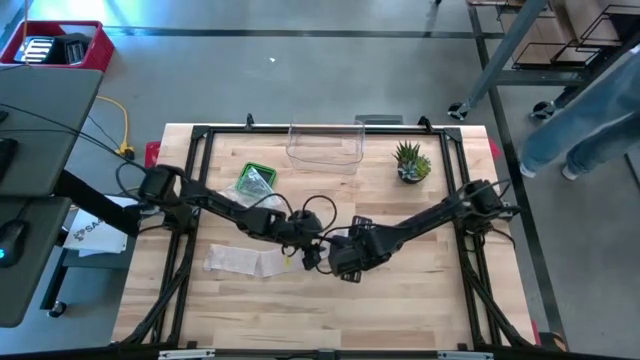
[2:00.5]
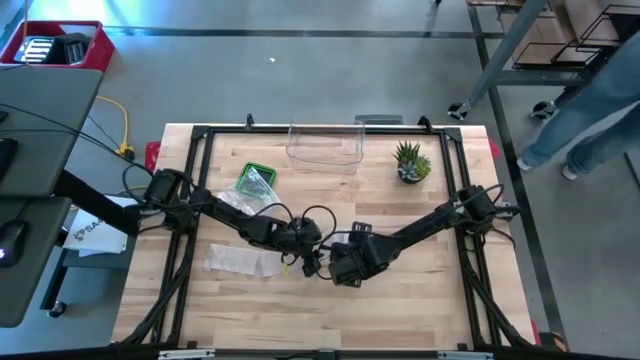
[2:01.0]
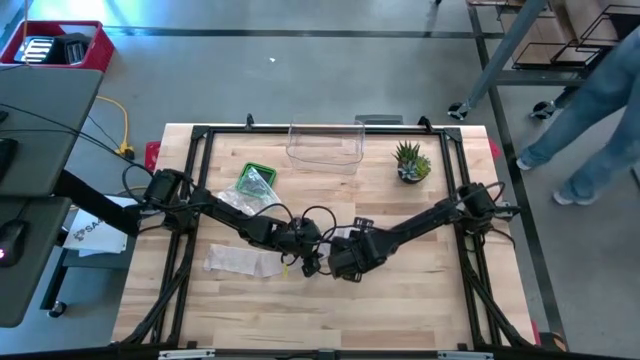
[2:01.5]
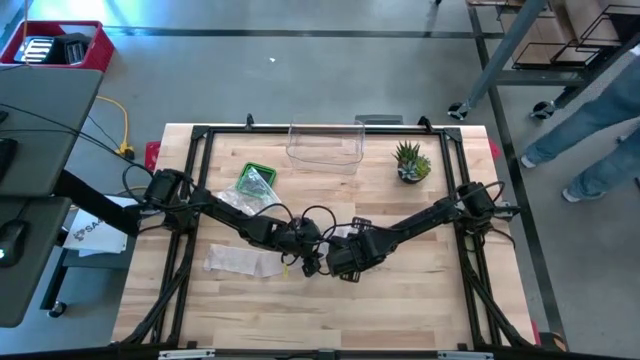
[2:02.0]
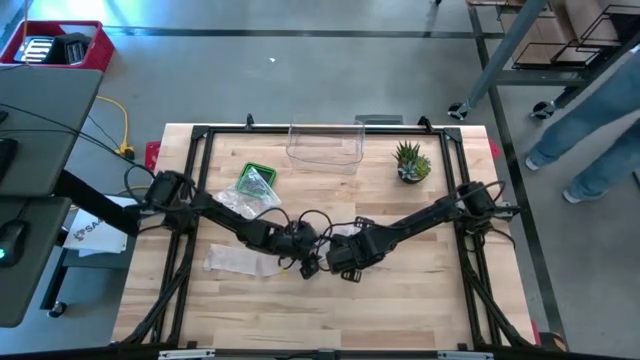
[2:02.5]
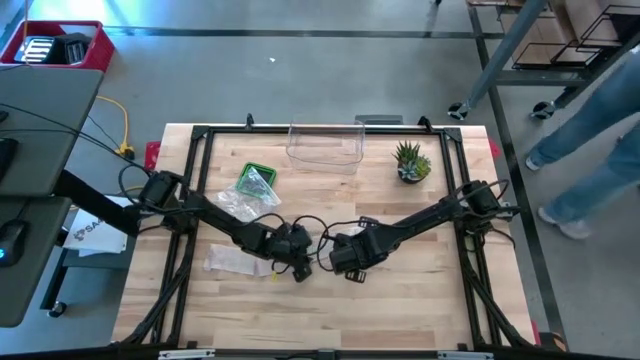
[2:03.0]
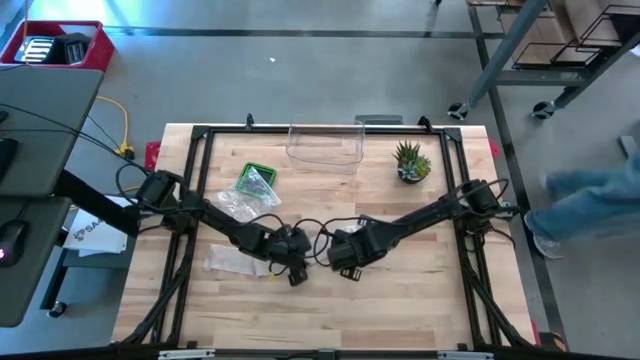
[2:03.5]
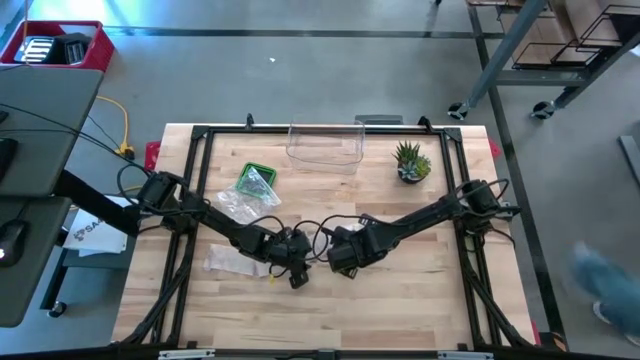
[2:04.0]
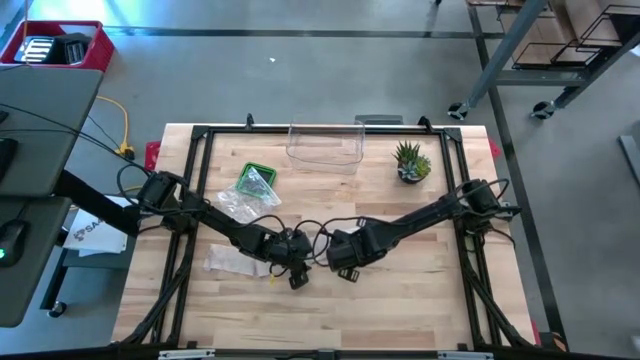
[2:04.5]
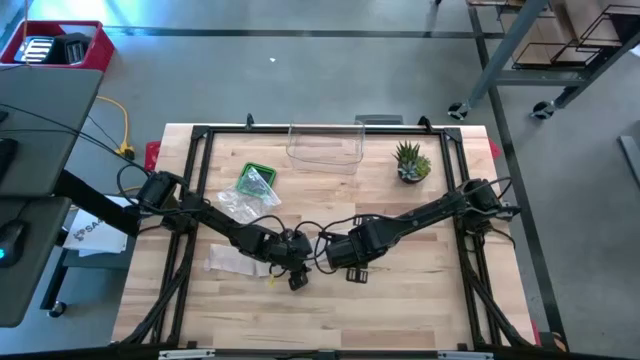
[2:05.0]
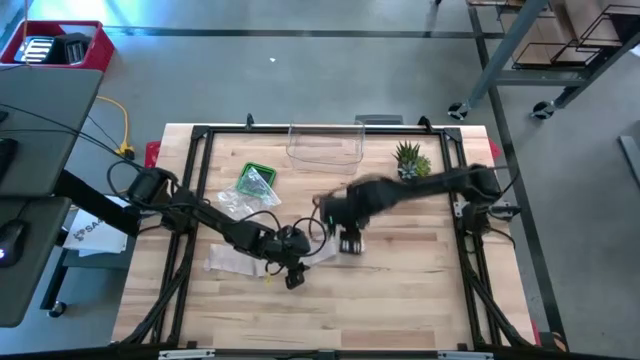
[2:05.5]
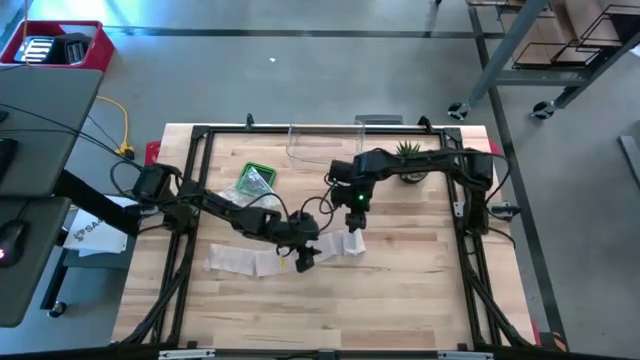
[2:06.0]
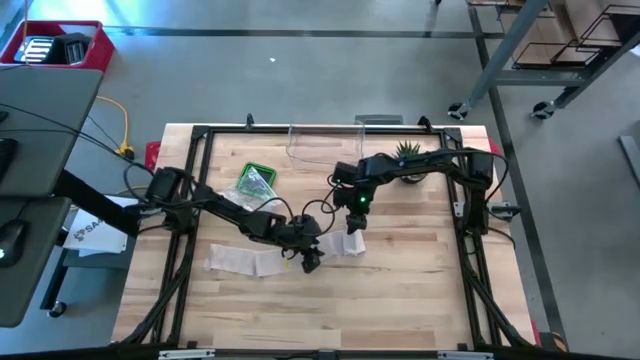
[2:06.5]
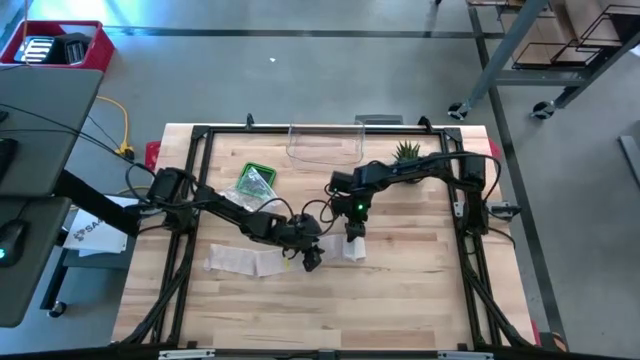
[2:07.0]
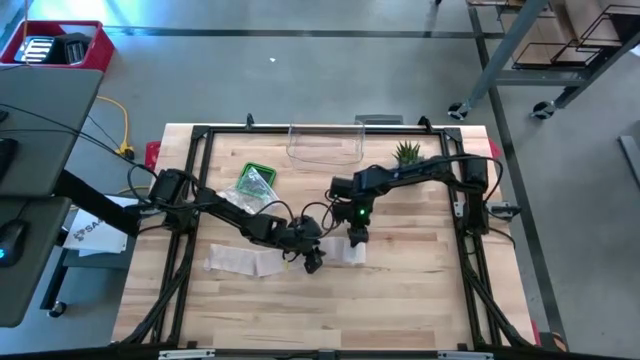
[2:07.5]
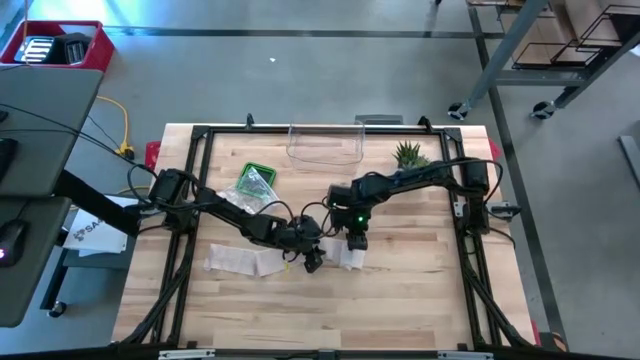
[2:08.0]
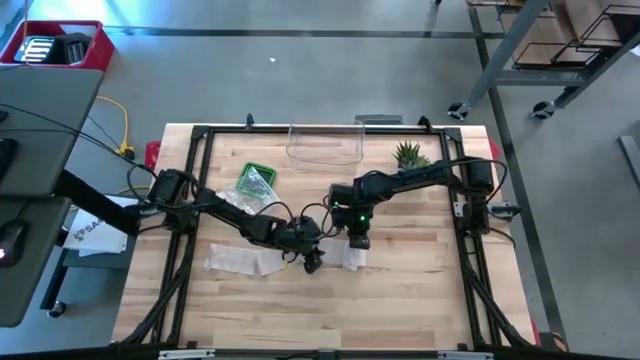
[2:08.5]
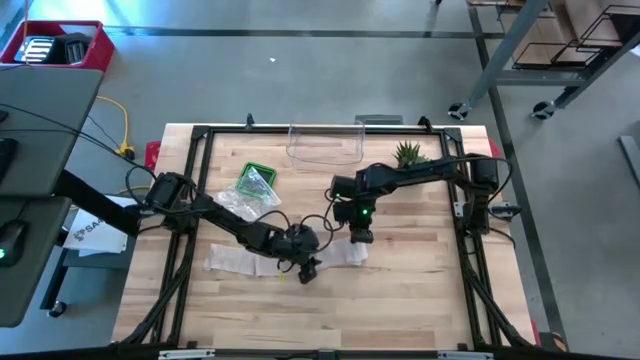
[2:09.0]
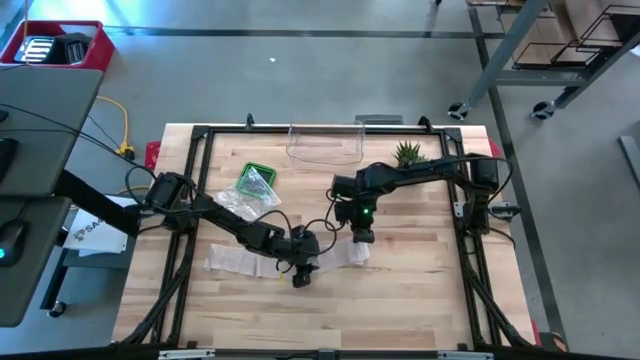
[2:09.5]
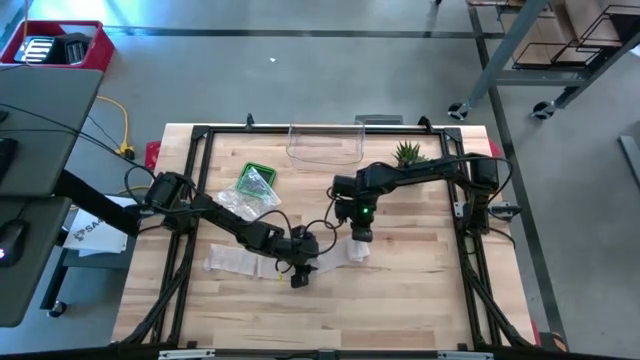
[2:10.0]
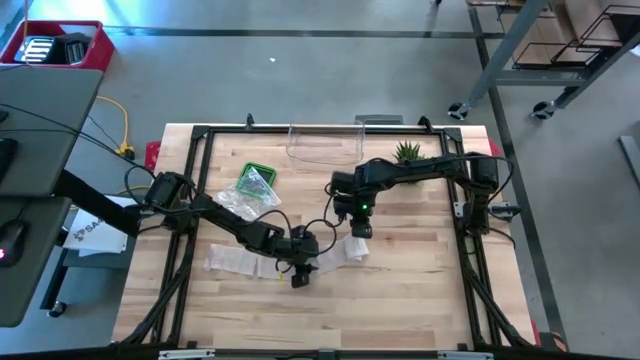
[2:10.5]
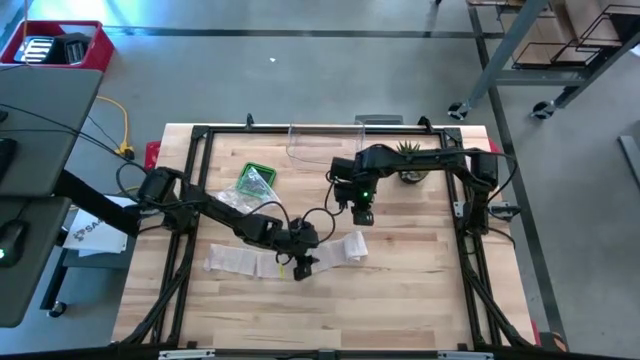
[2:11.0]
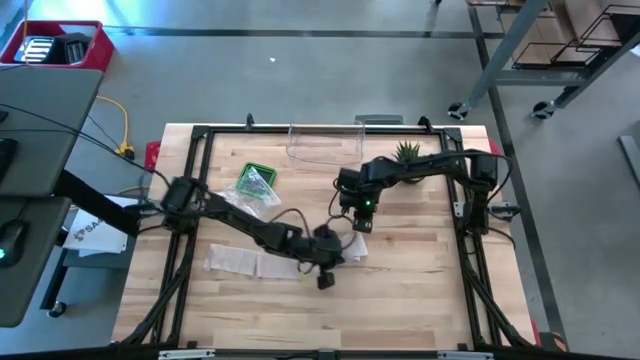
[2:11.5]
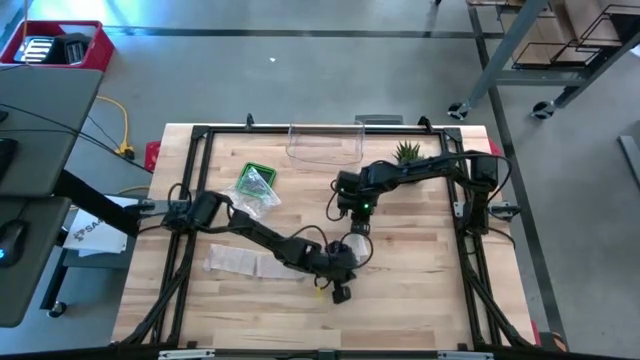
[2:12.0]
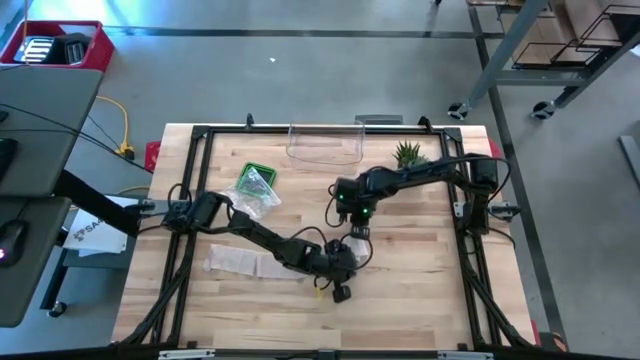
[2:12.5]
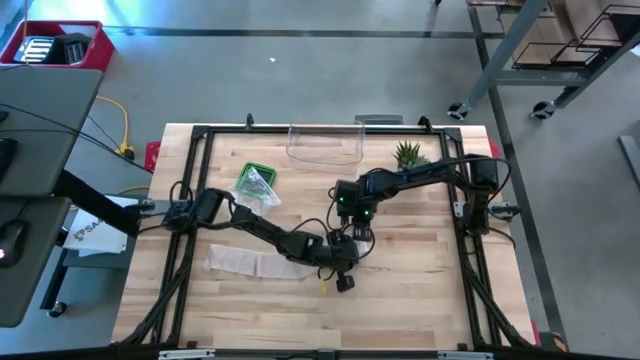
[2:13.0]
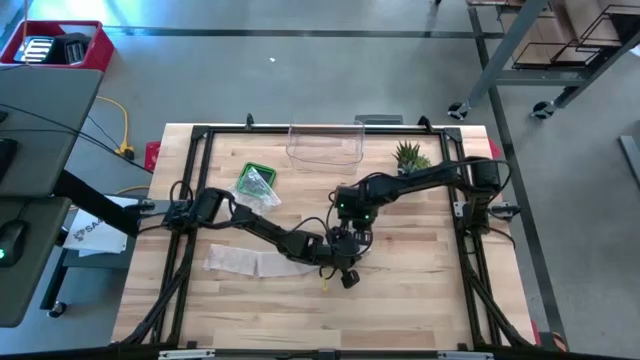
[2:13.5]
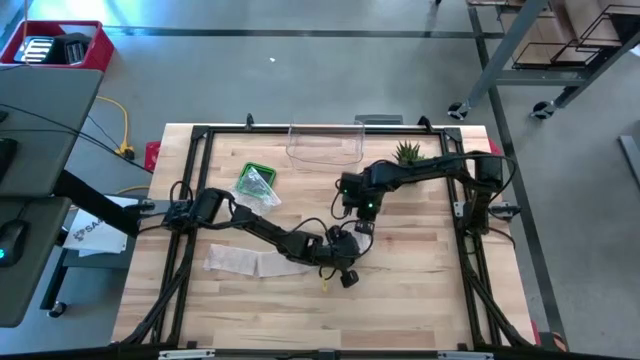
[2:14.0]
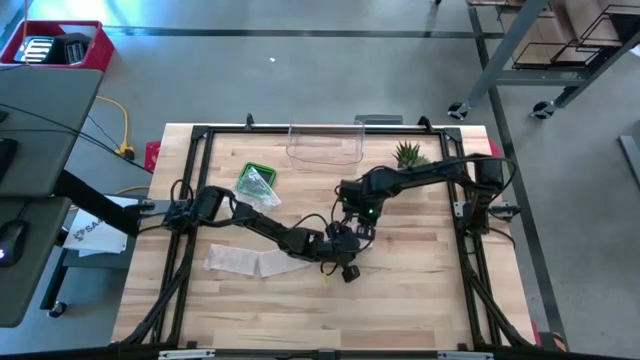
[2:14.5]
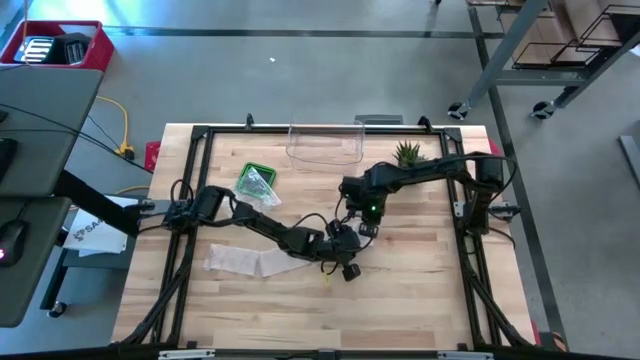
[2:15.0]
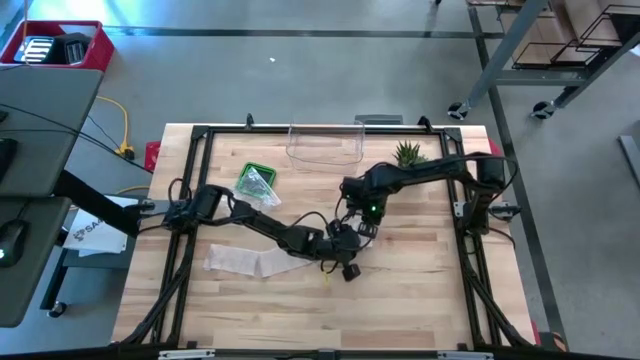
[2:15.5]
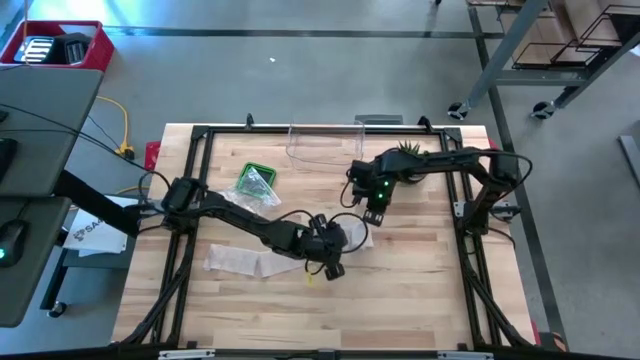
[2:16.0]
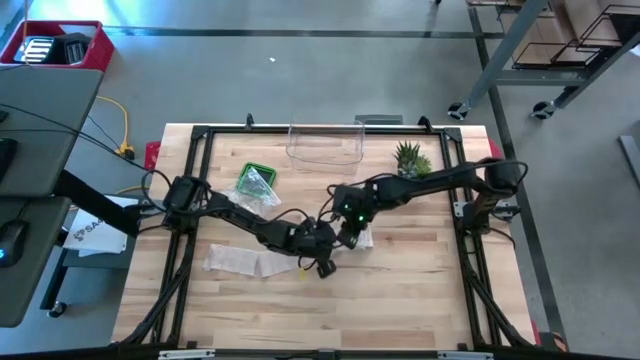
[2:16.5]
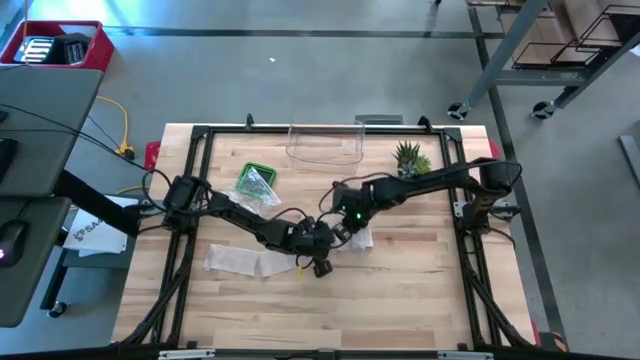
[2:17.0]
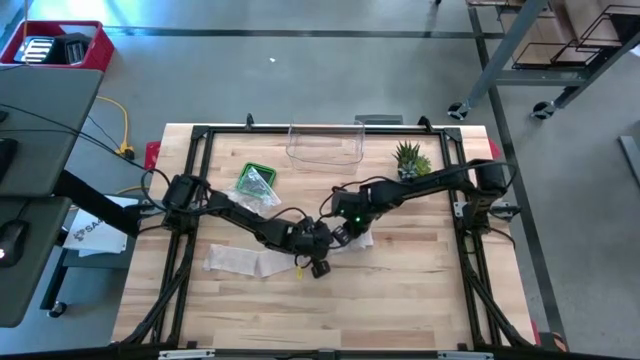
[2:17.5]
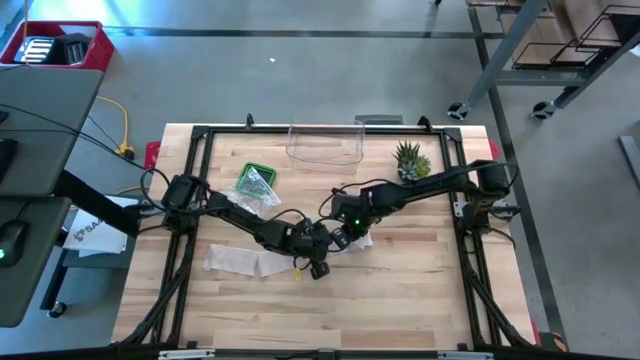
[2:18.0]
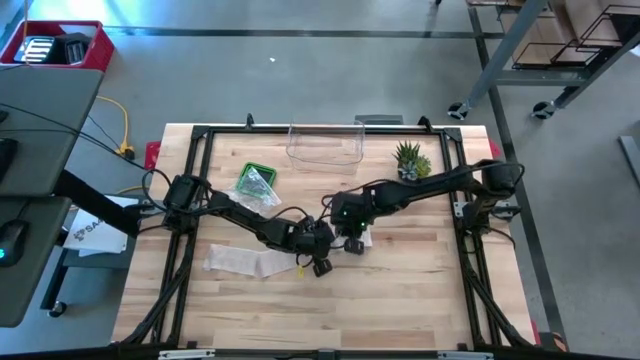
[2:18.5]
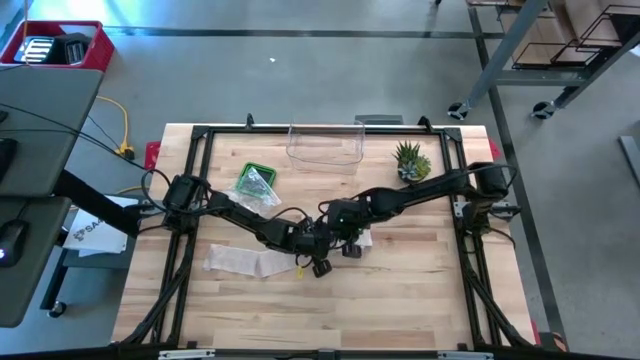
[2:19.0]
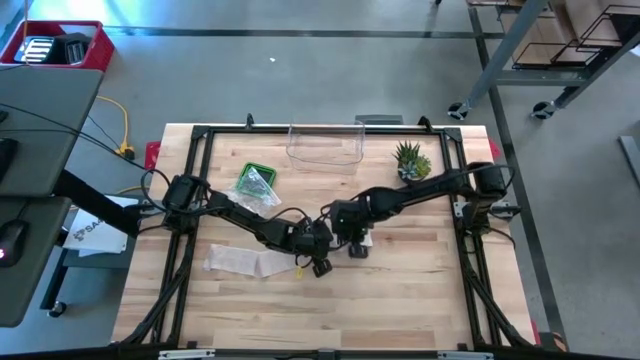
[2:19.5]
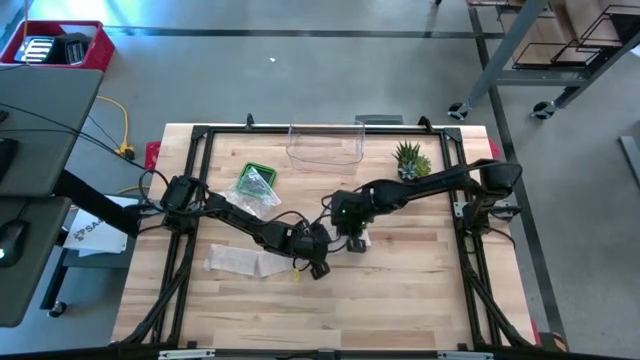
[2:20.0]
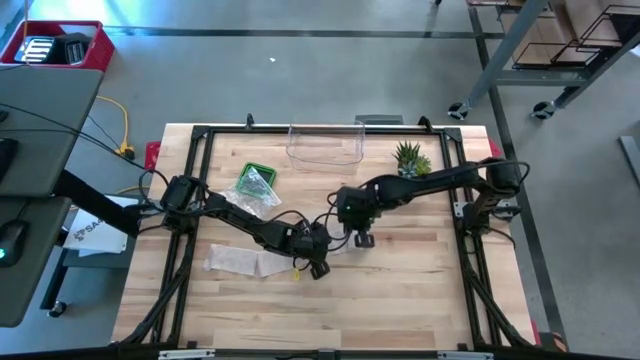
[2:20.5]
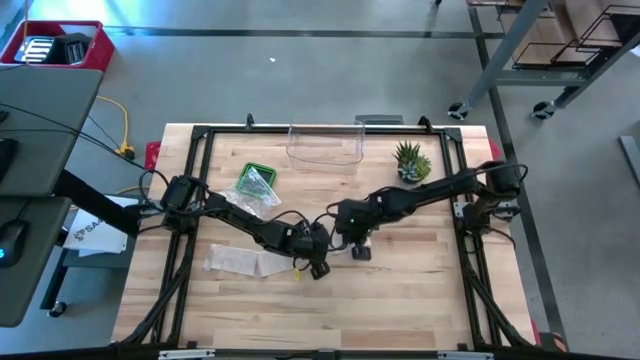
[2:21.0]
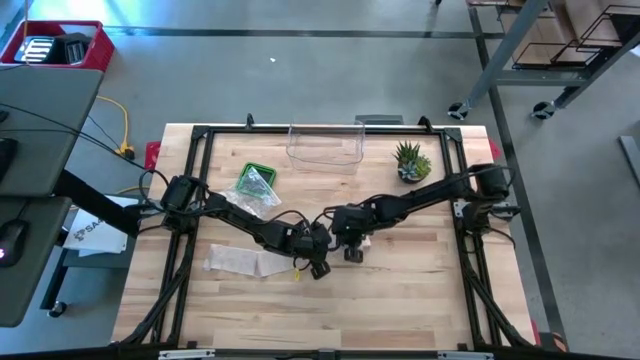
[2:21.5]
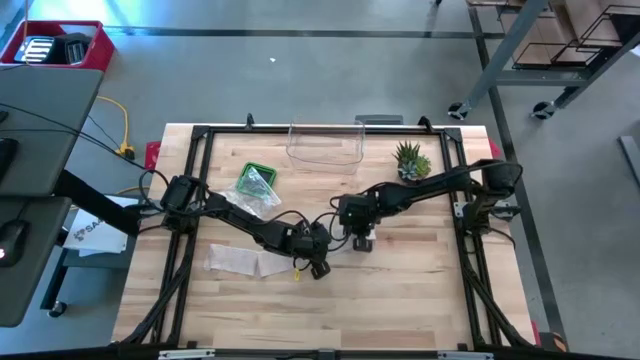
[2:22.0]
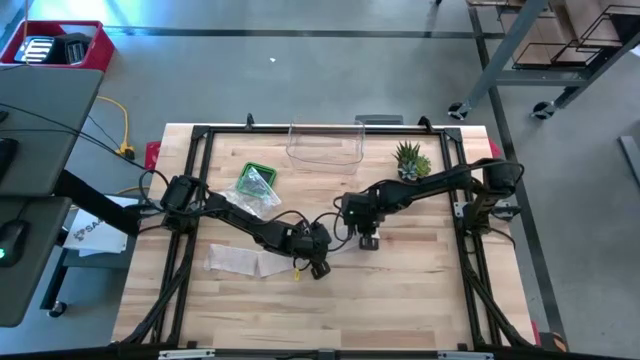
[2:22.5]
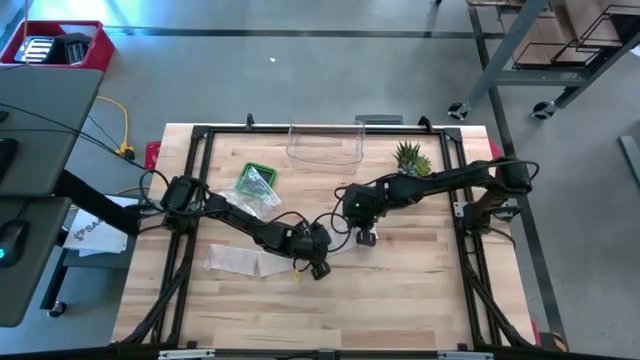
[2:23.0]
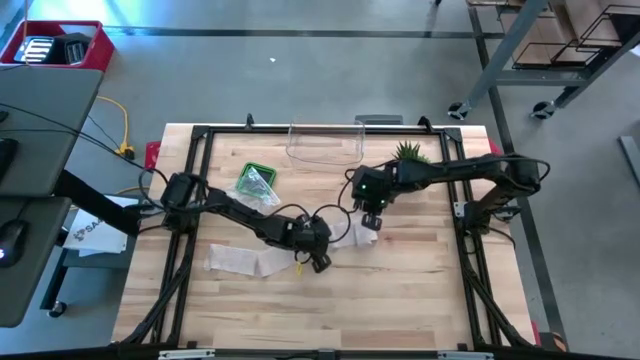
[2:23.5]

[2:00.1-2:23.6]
Task: Roll bandage
Roll the bandage
